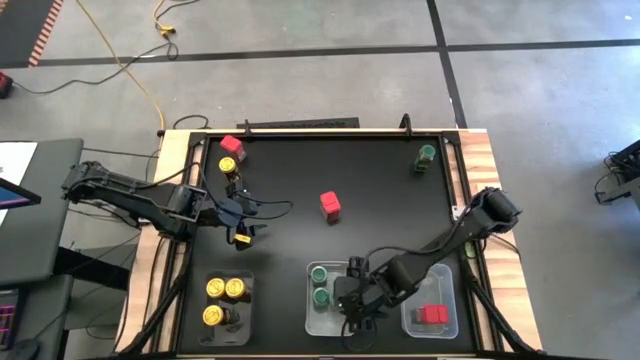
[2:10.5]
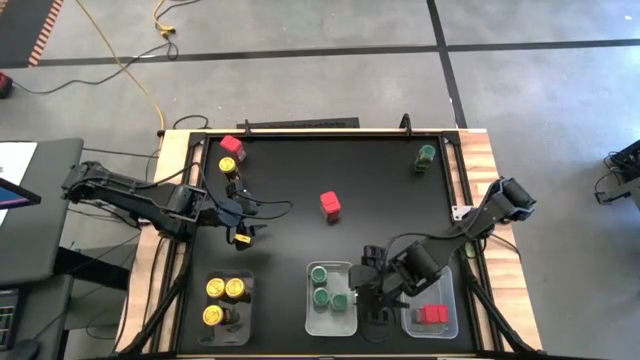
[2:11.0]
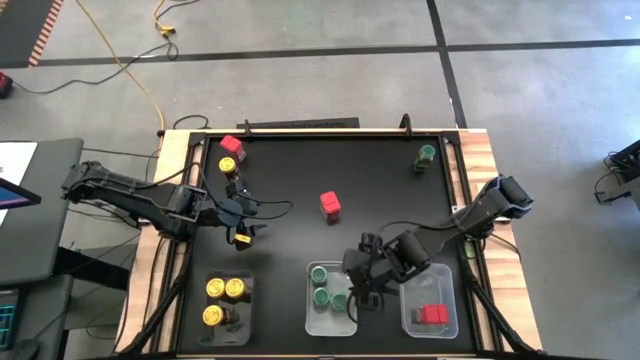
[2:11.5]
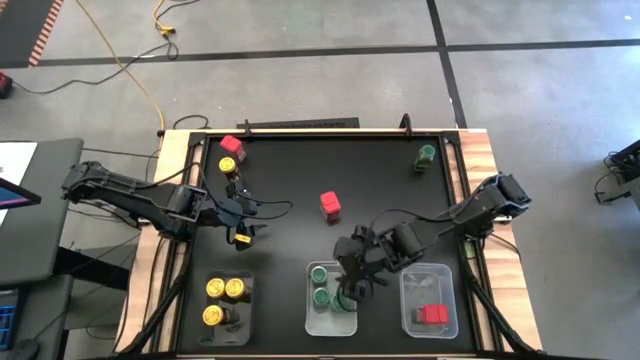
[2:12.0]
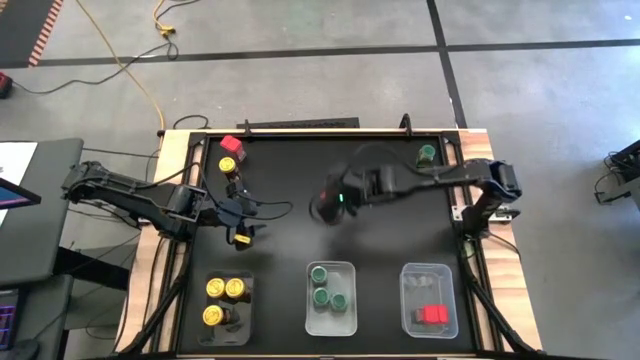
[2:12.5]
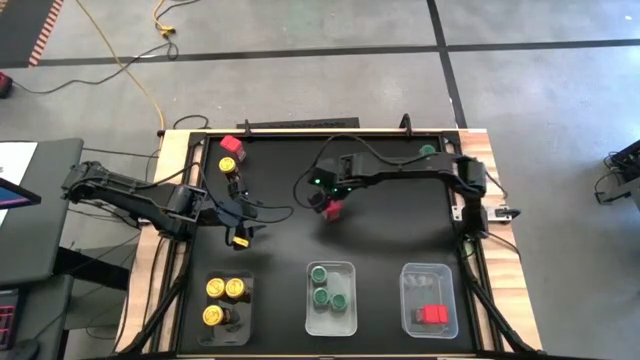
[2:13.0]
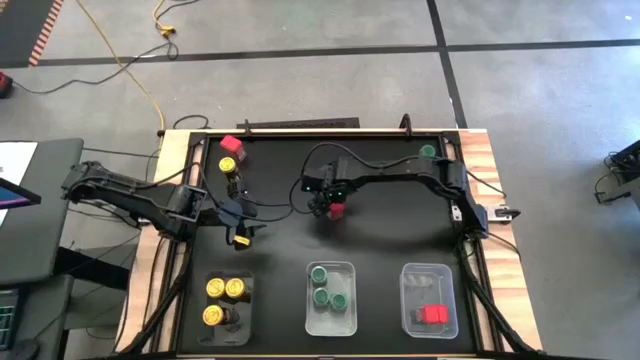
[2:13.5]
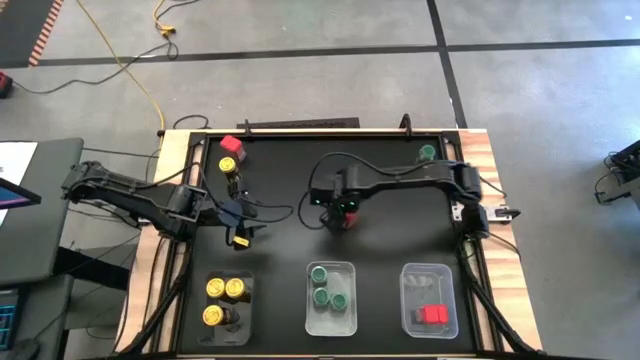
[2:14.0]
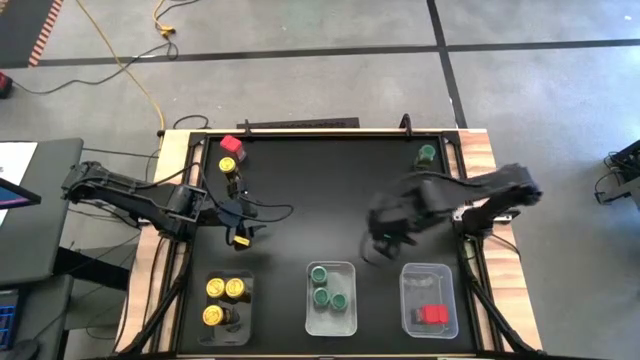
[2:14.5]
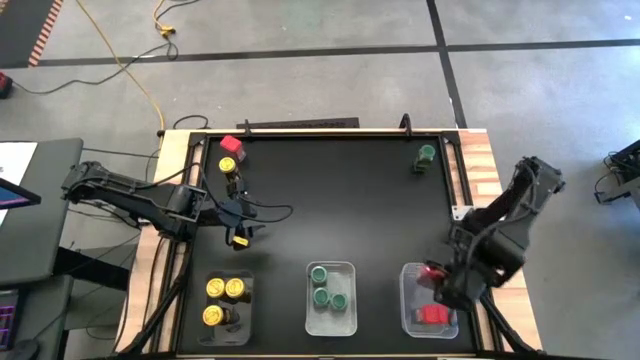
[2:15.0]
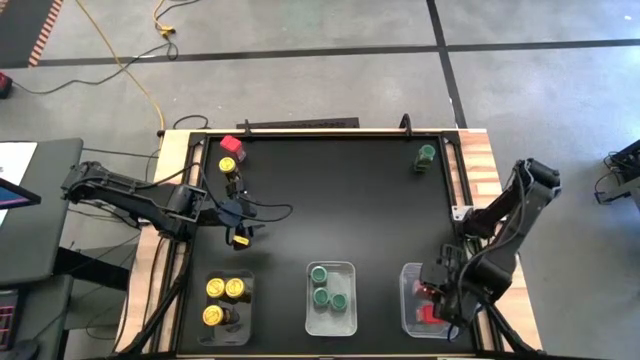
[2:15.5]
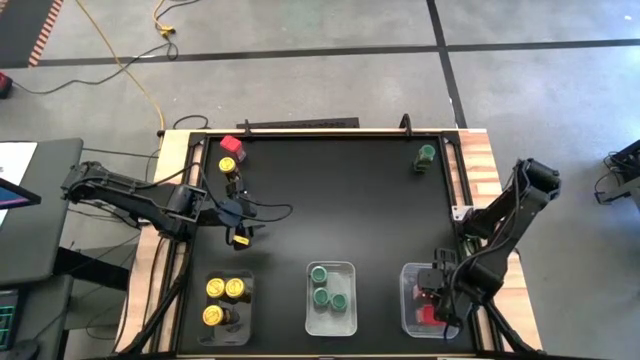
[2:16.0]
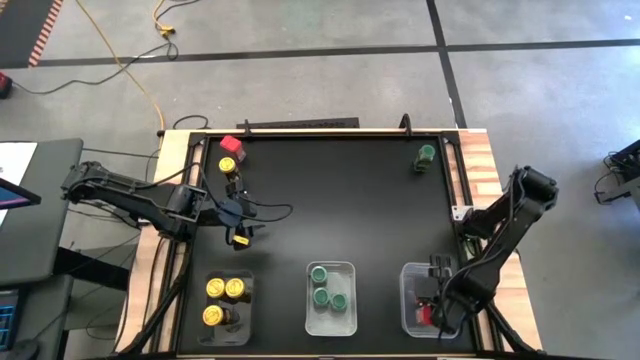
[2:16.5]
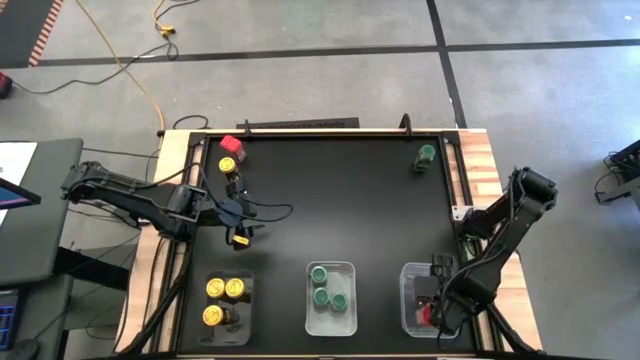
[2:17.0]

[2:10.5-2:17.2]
Task: Sort spices by type
Put the bottom right red seasoning can into the transparent bin

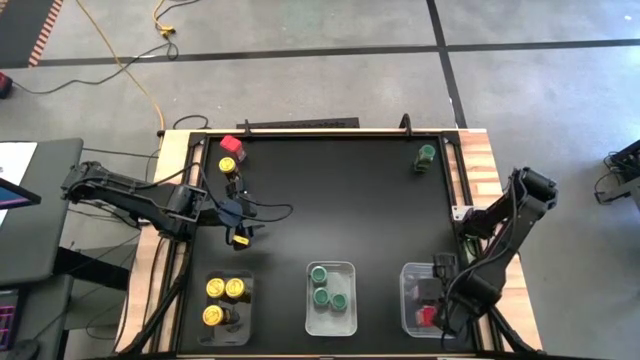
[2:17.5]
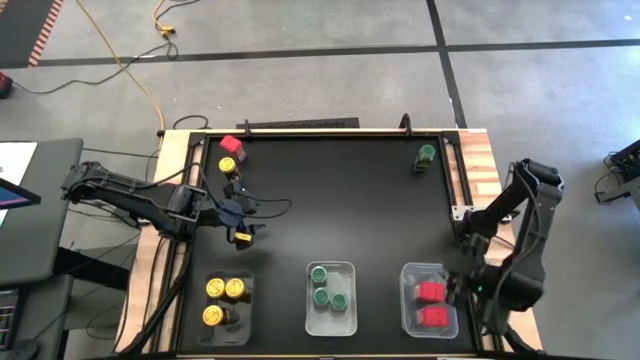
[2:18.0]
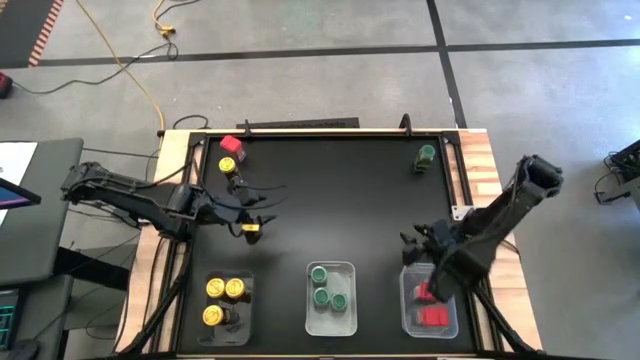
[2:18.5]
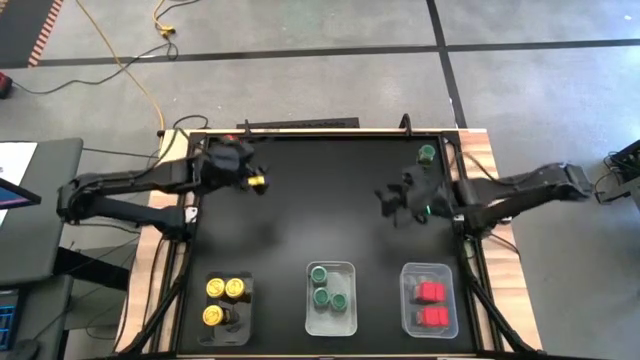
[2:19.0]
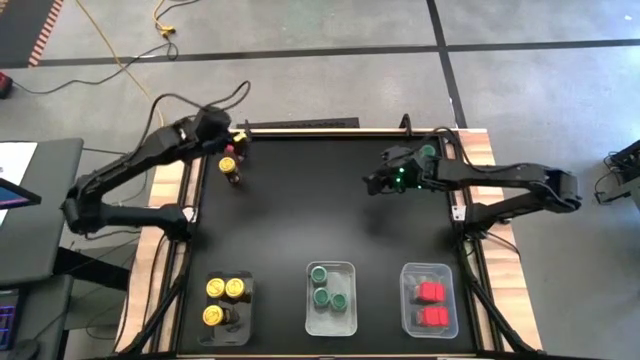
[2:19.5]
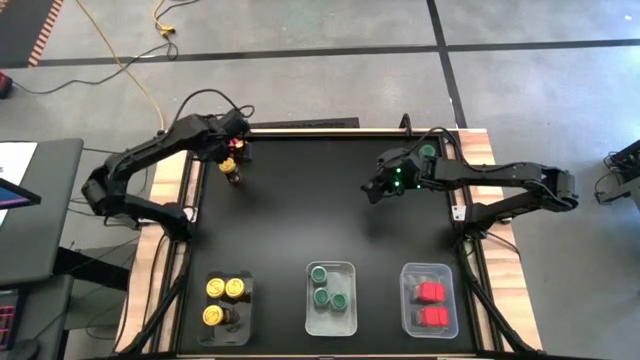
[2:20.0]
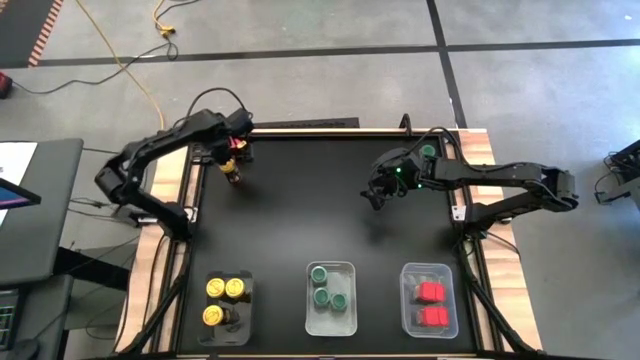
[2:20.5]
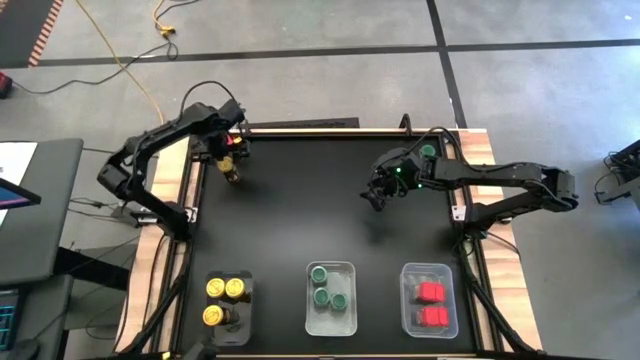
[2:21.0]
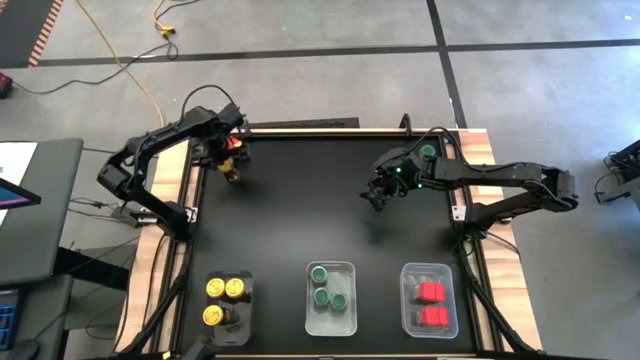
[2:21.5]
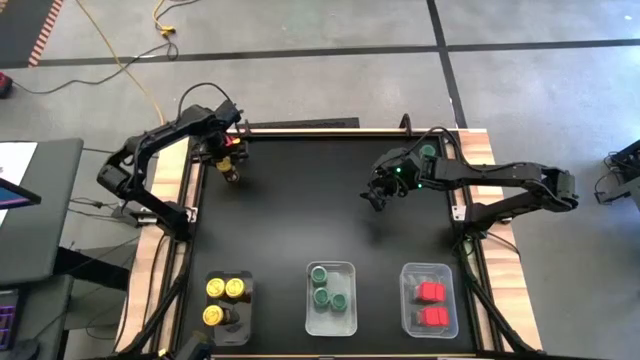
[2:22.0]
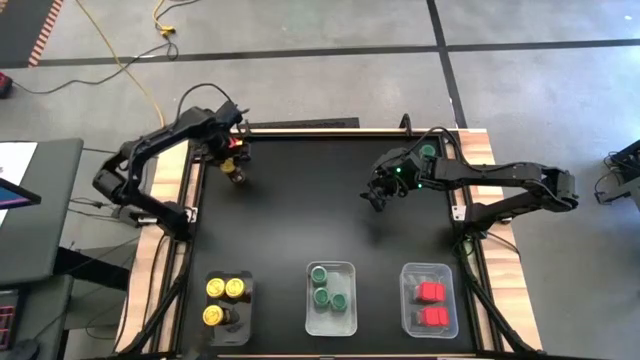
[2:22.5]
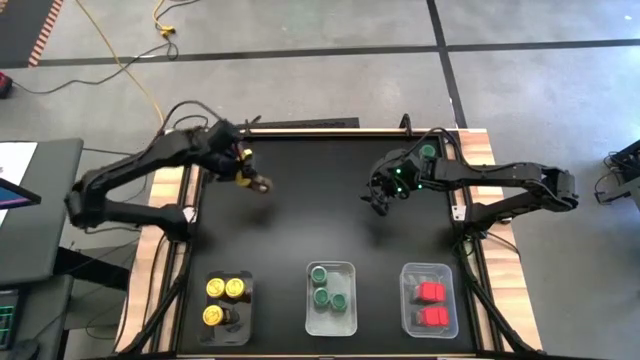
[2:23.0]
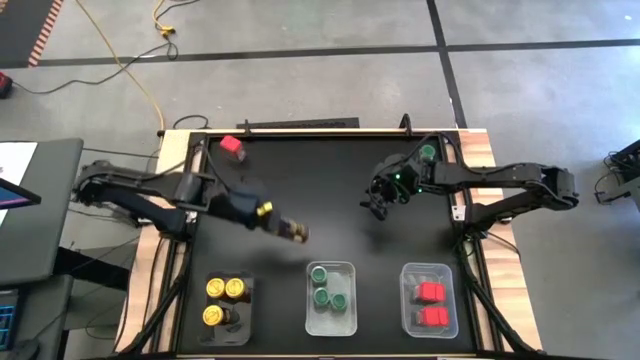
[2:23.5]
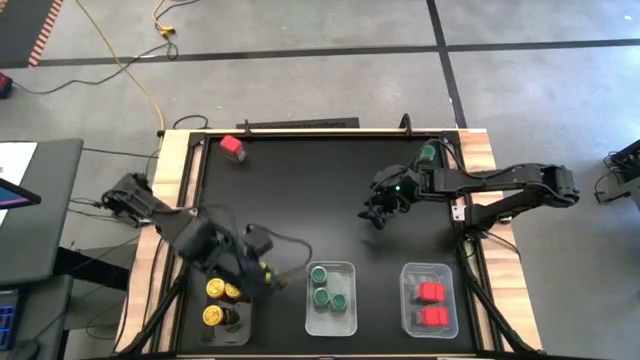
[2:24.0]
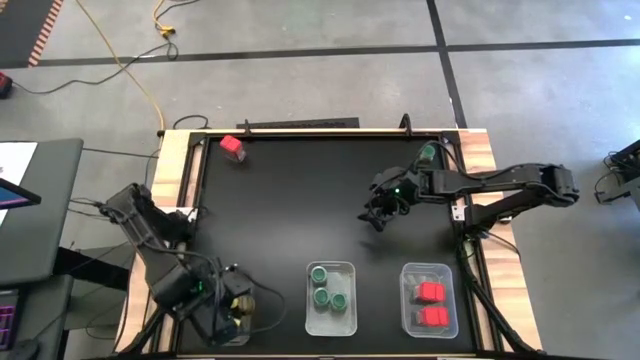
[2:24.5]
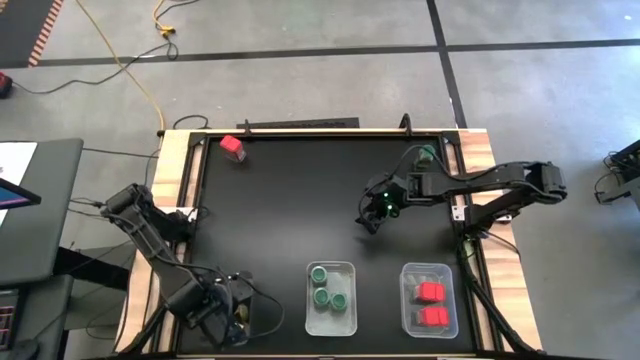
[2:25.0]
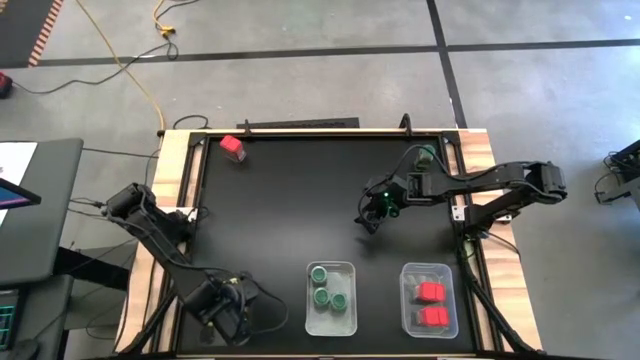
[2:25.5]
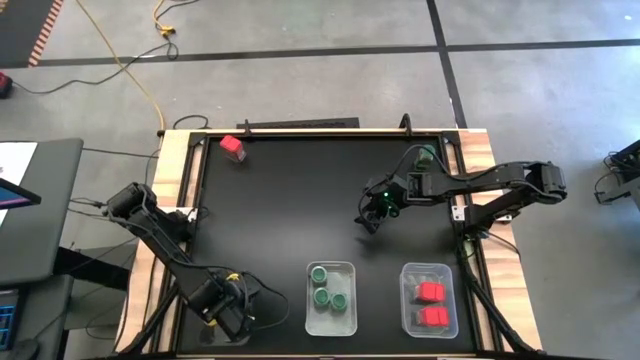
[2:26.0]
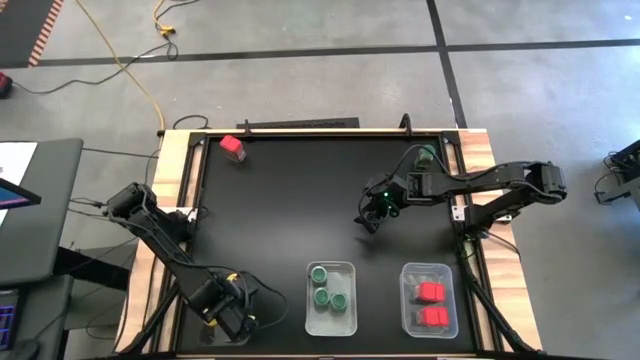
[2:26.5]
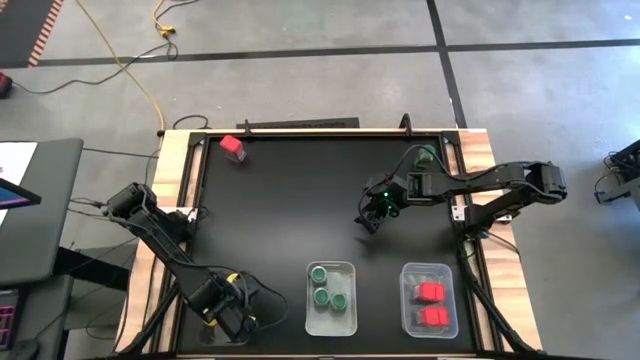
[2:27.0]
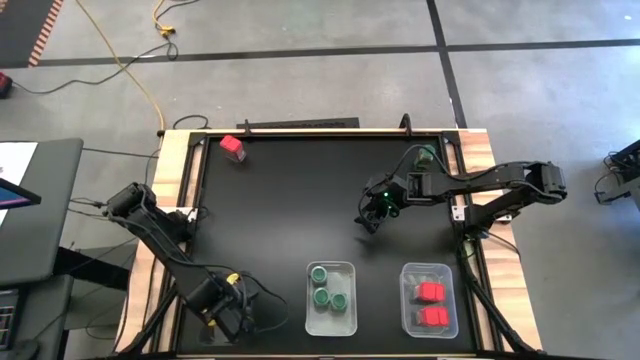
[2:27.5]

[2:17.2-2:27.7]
Put the yellow seasoning bottle into the black bin

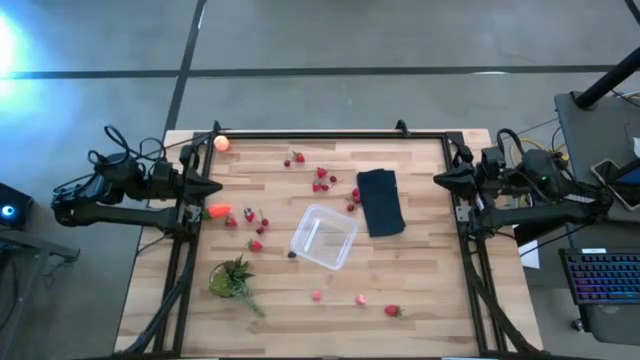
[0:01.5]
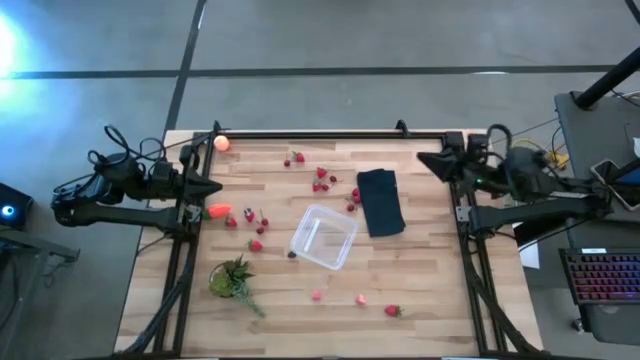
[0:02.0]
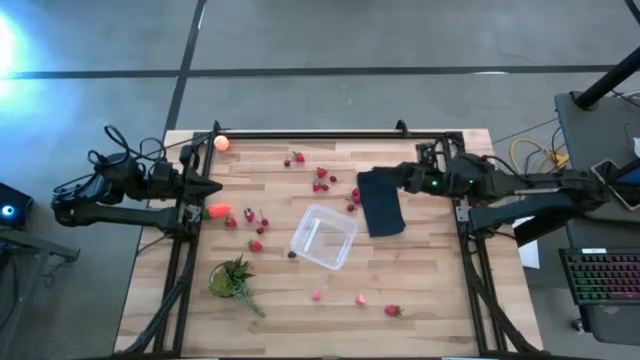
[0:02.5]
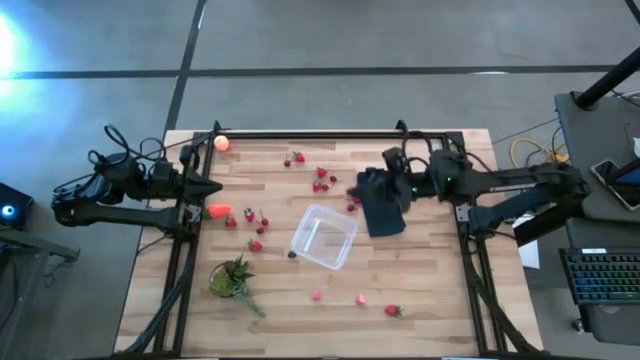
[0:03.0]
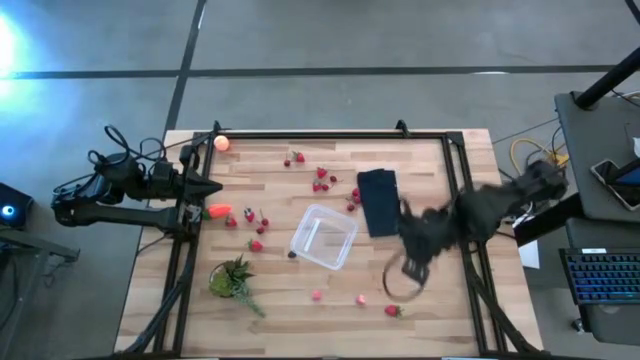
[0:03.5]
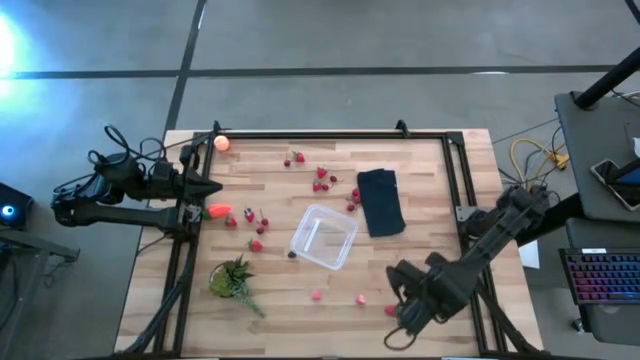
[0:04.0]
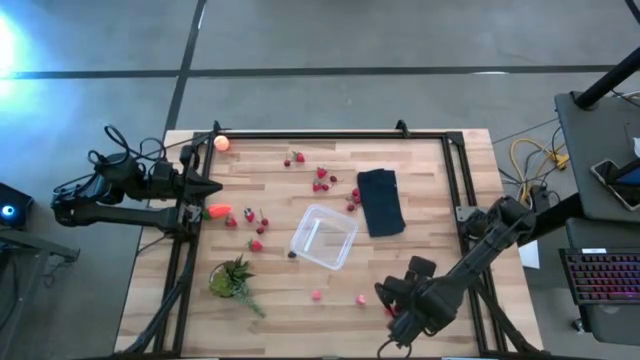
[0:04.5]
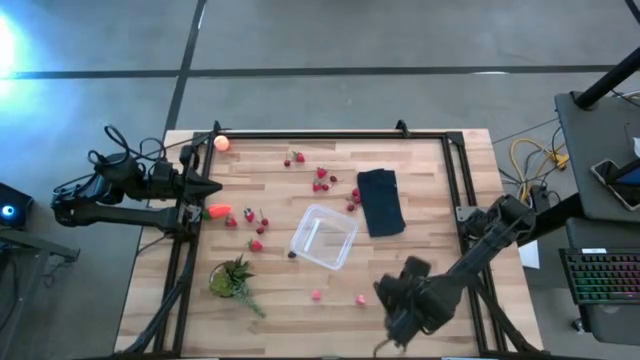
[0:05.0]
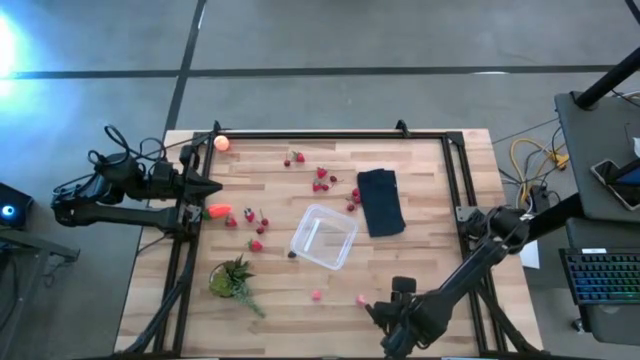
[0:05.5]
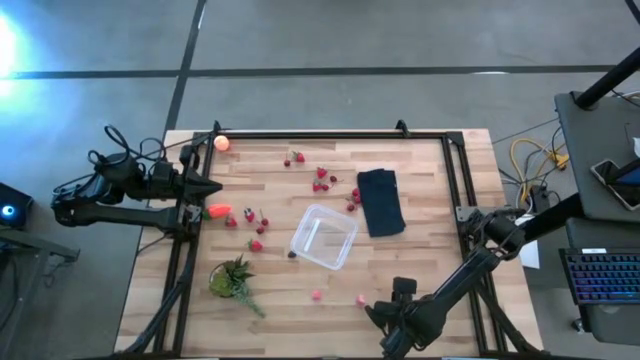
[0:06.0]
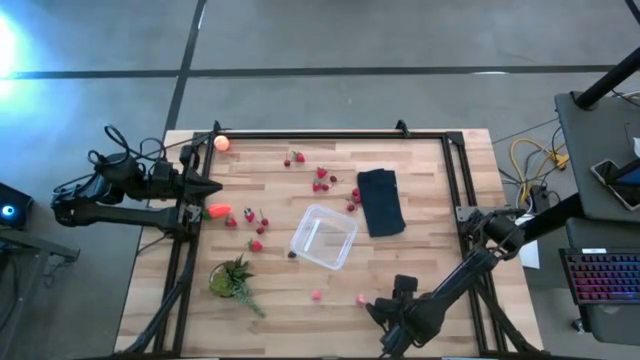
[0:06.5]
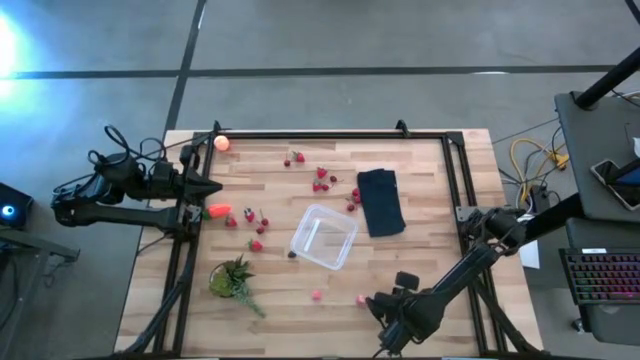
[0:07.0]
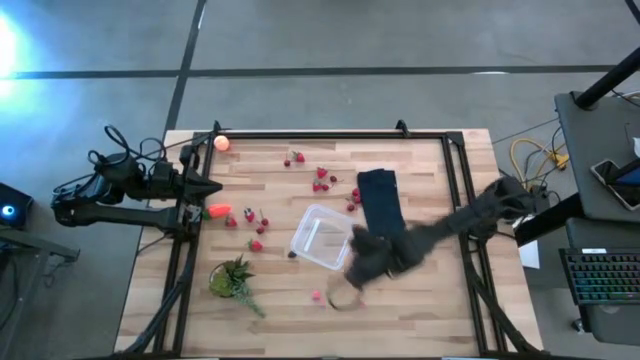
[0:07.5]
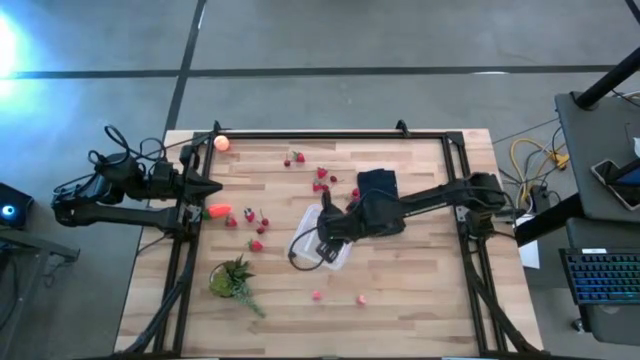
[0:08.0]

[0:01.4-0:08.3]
Task: Pick and placing Produce into tupperware
Put the red strawberry into the transparent bin
